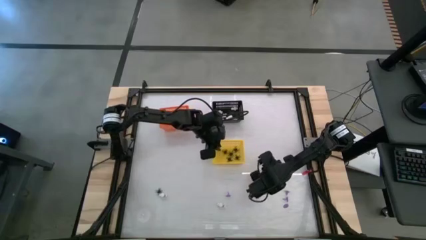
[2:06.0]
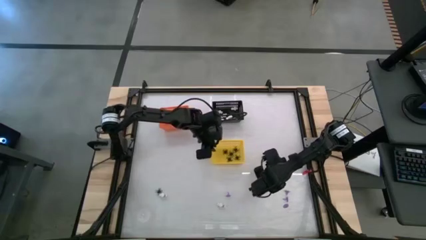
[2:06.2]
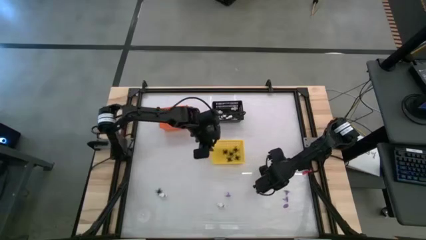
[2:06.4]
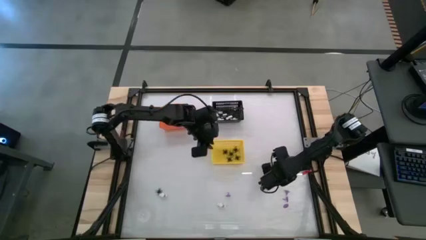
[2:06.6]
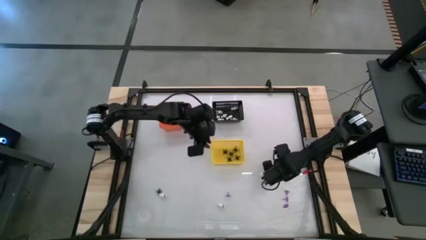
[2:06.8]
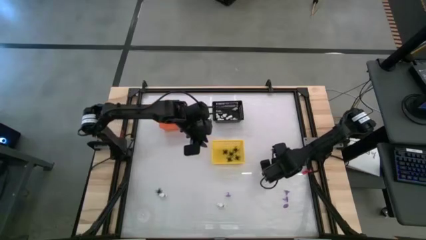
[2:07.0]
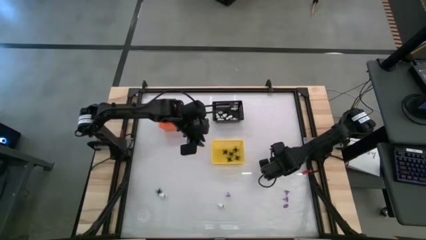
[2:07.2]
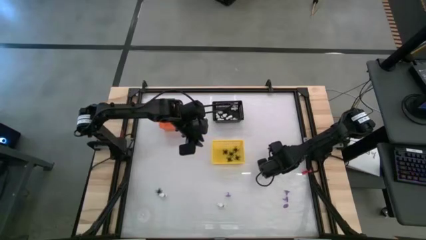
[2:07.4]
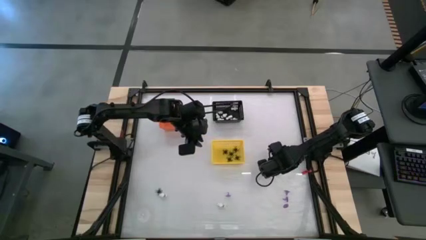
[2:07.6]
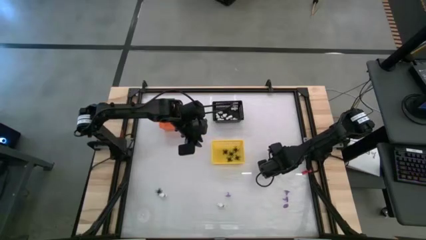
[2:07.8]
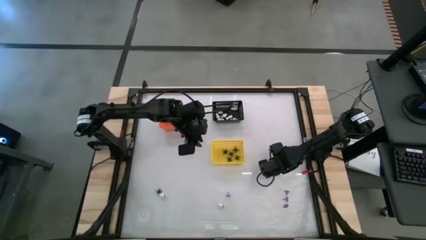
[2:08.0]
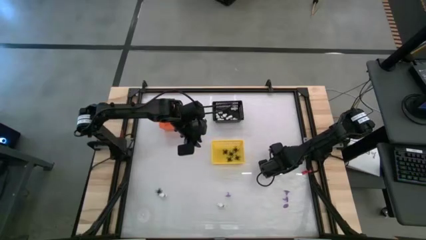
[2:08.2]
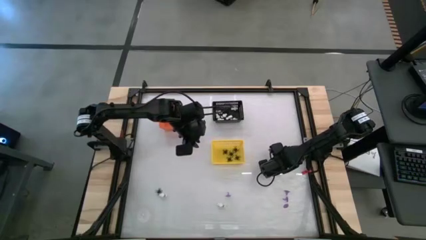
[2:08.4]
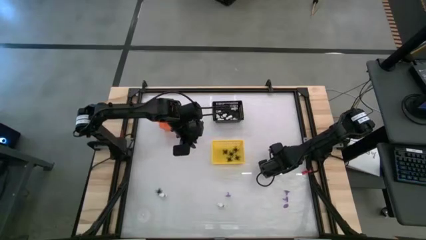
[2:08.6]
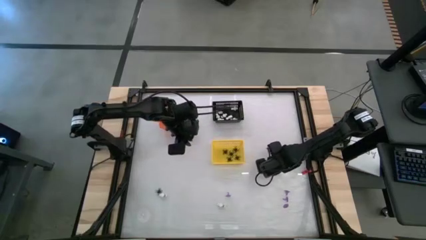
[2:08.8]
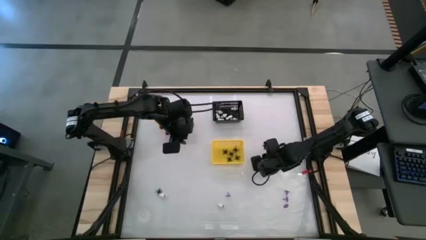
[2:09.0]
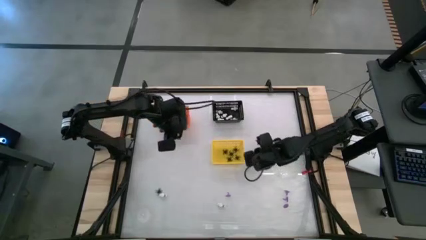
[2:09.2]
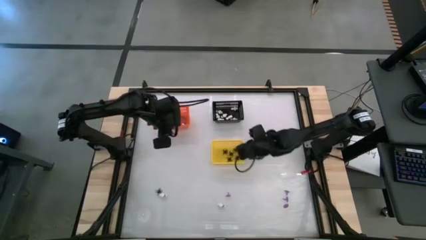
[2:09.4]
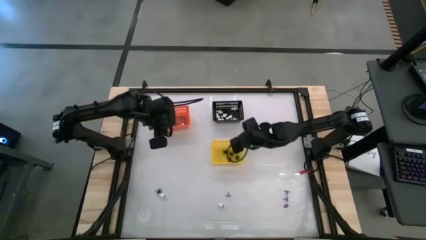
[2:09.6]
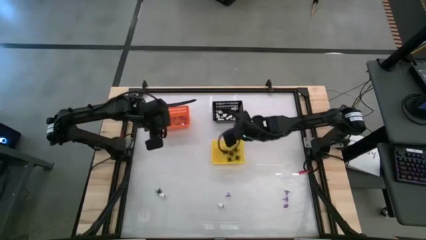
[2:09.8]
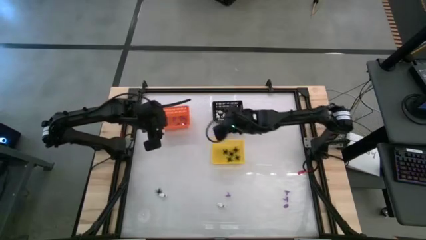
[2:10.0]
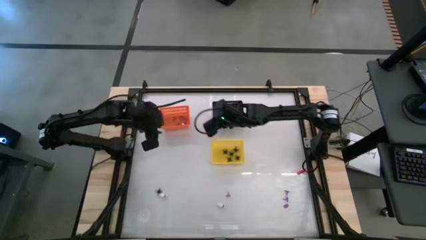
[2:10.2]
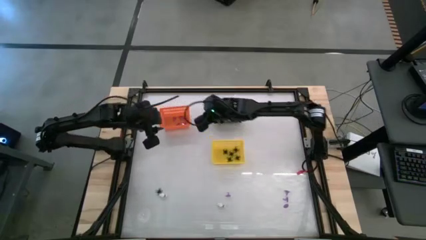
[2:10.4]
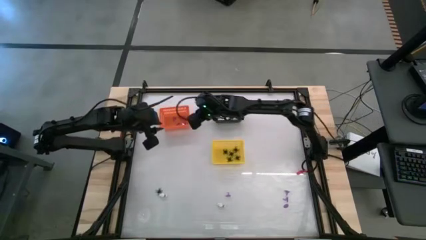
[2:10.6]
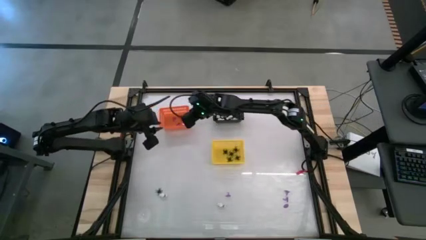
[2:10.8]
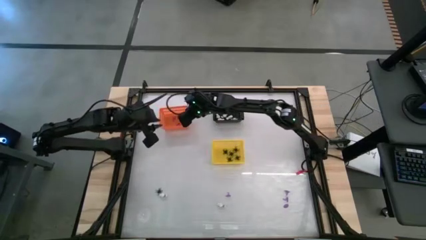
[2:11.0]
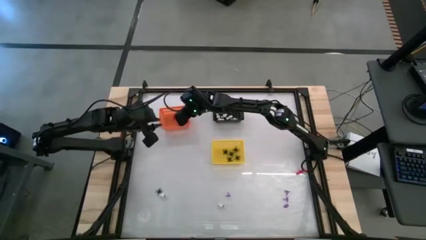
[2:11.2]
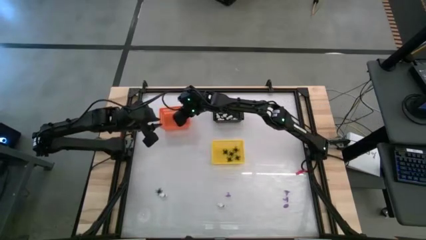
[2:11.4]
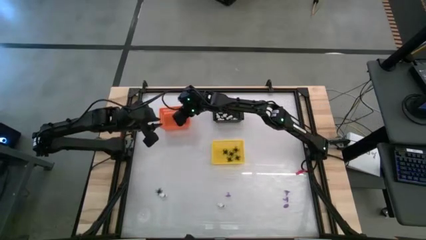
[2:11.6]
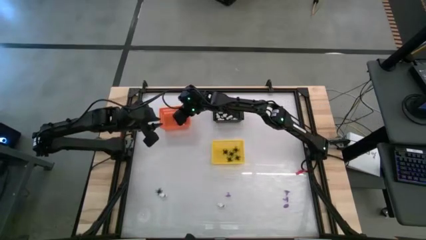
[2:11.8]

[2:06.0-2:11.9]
Task: Sort Halloween decoration
Put the violet witch hat into the orange bin

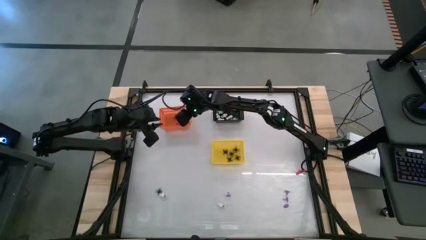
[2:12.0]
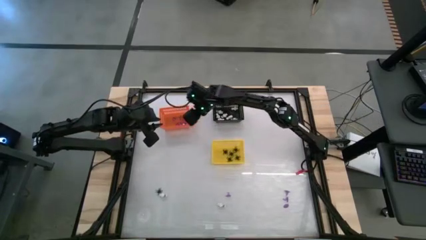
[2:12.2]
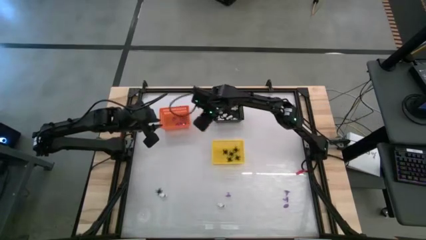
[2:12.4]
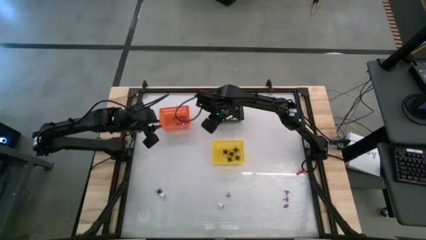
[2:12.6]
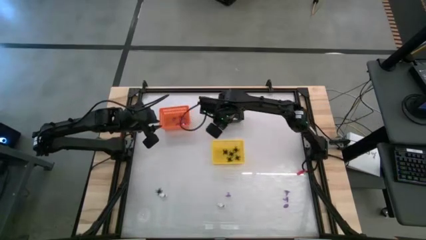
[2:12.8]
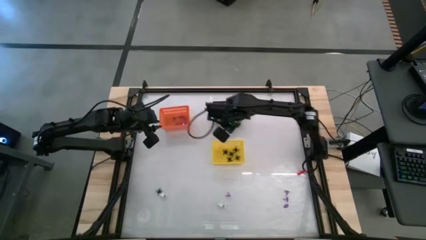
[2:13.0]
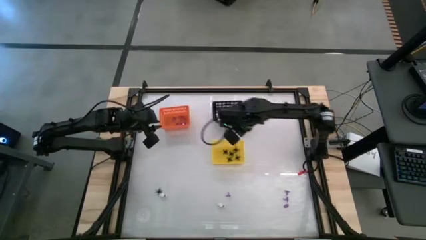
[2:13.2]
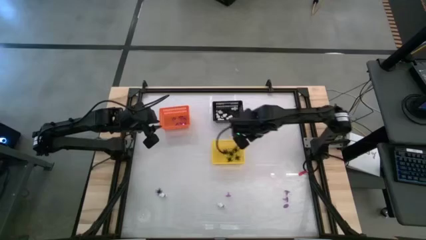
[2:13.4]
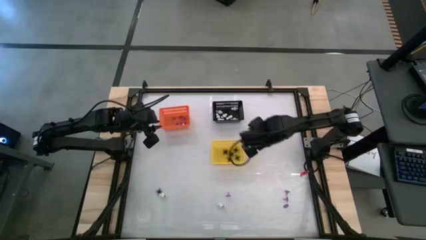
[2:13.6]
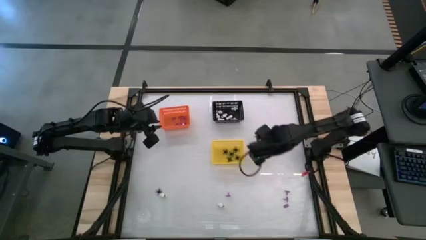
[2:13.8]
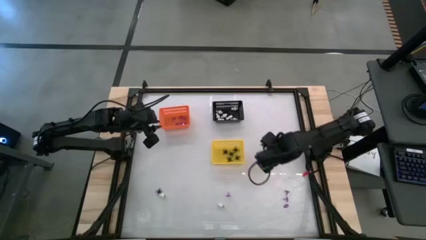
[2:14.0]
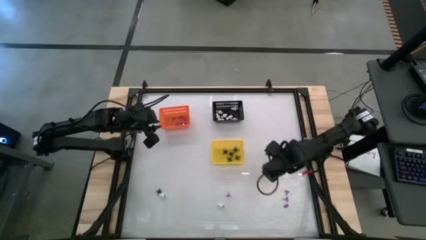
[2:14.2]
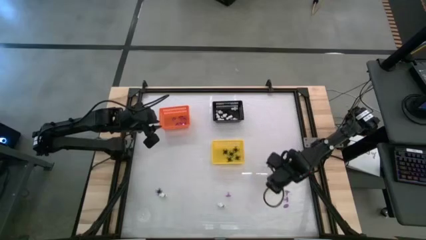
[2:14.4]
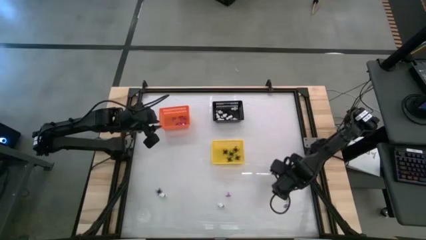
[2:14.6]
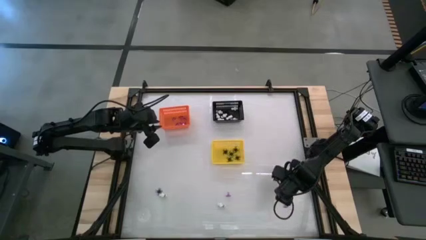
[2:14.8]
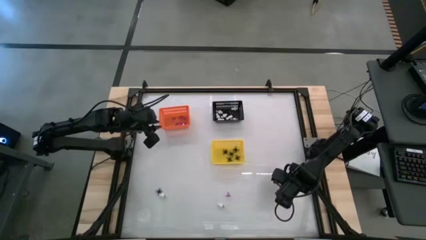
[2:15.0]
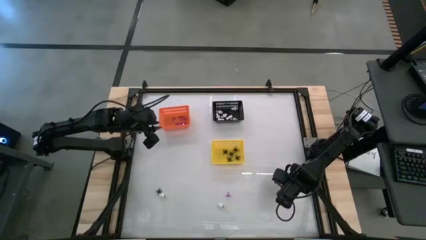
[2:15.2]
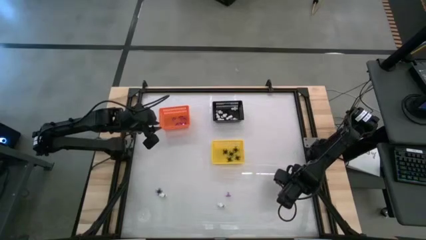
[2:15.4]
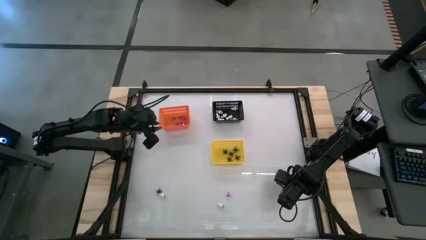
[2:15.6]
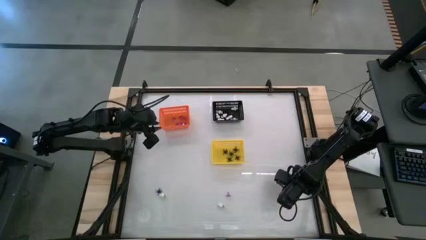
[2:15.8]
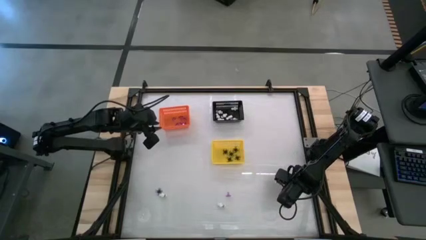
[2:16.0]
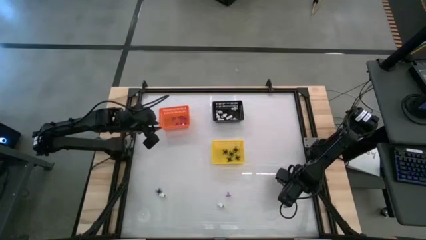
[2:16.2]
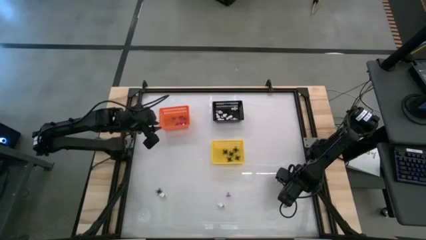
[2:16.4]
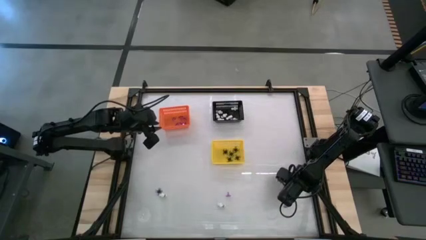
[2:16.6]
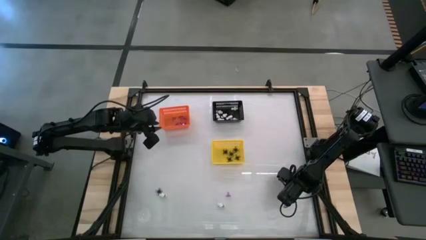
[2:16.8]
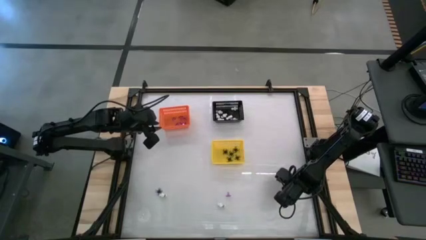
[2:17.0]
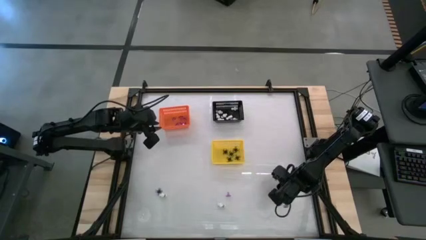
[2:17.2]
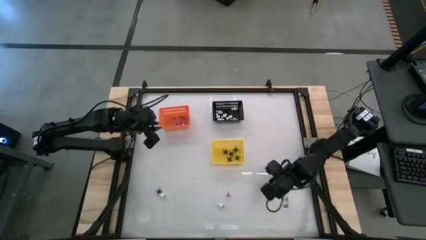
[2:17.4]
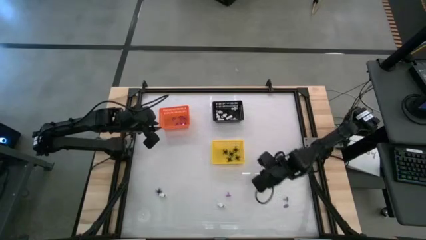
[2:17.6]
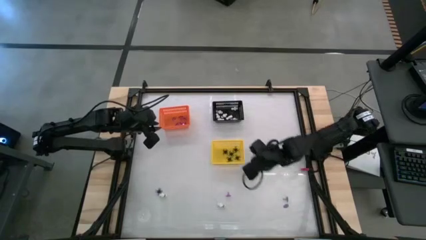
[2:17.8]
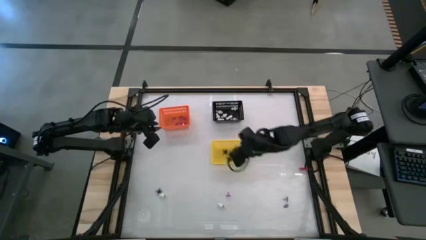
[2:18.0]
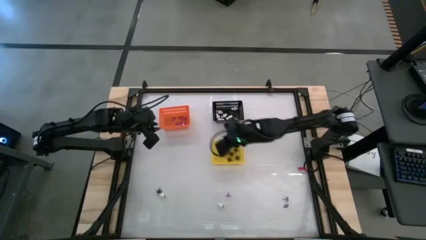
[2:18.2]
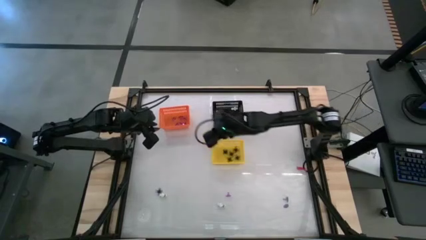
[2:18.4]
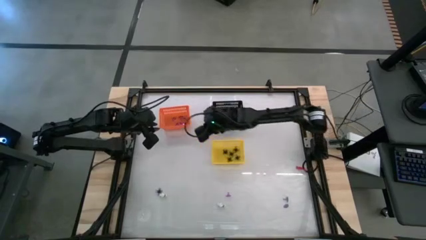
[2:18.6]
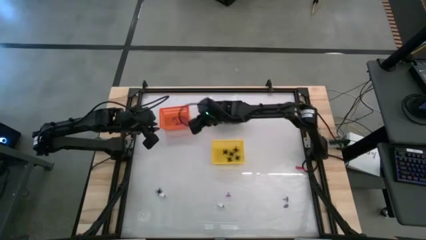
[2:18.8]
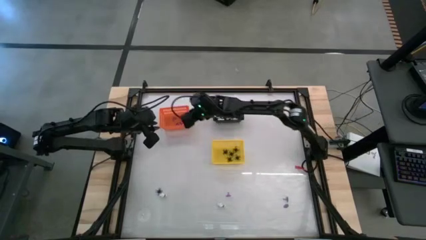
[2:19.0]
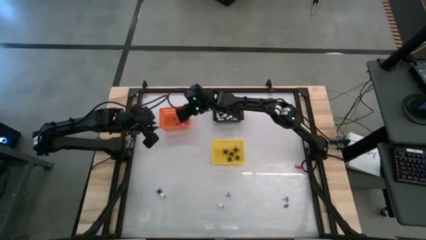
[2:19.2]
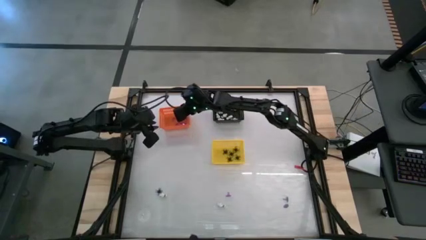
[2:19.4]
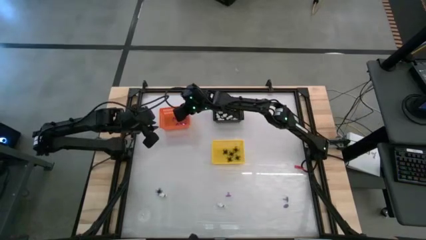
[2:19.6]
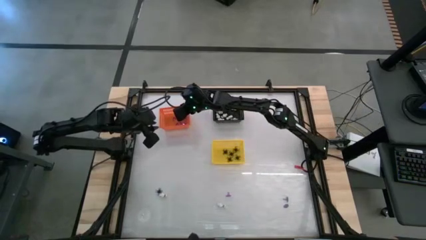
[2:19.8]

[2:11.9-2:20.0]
Put the violet witch hat into the orange bin

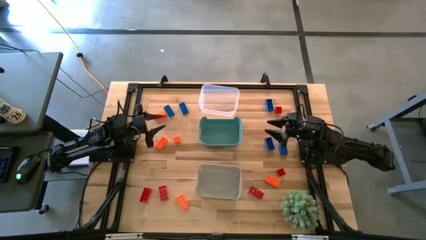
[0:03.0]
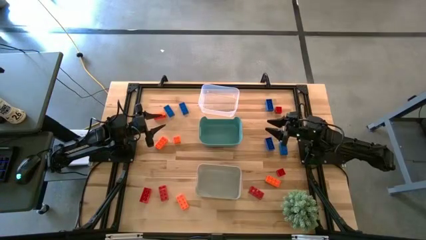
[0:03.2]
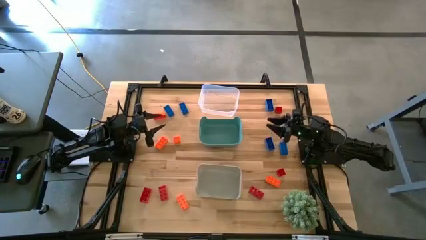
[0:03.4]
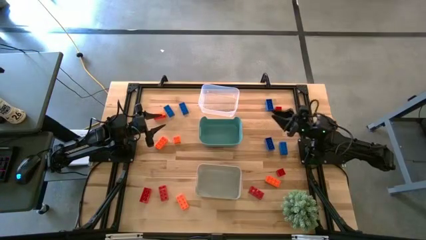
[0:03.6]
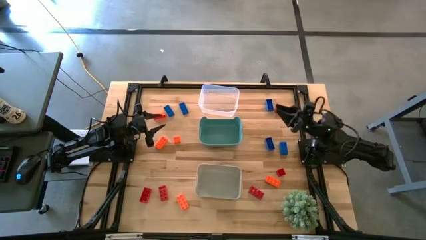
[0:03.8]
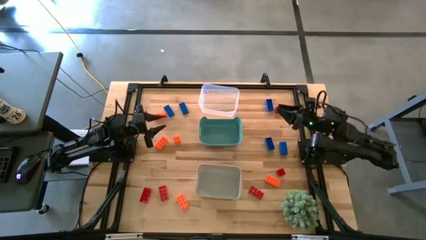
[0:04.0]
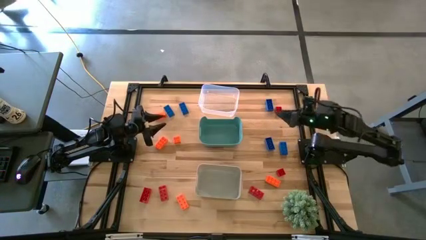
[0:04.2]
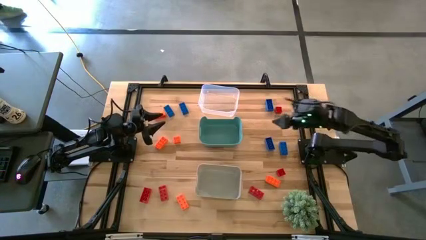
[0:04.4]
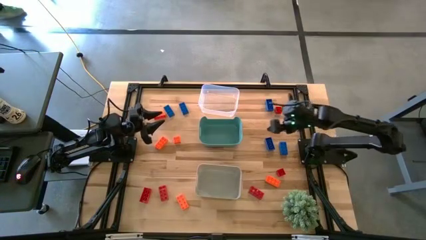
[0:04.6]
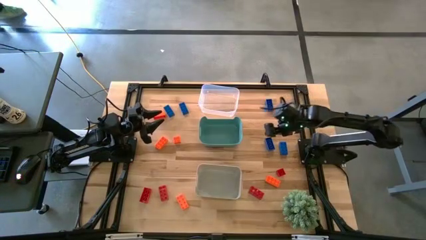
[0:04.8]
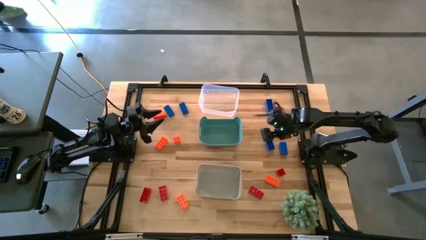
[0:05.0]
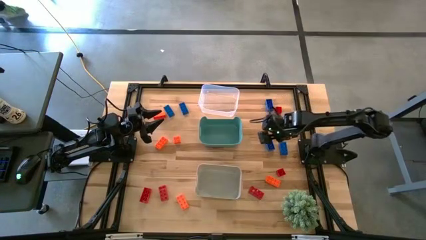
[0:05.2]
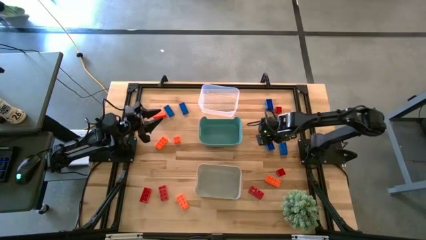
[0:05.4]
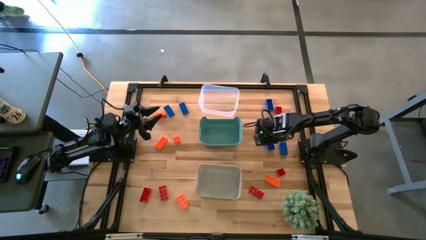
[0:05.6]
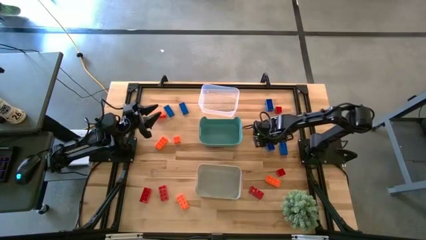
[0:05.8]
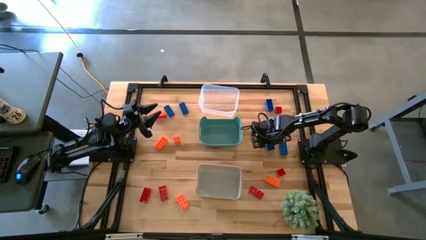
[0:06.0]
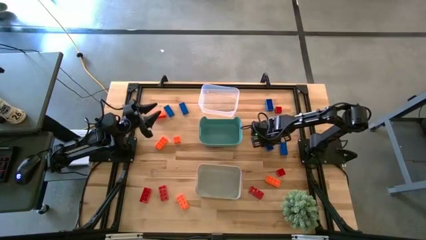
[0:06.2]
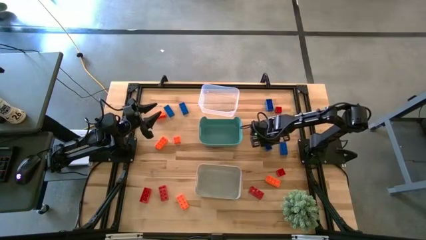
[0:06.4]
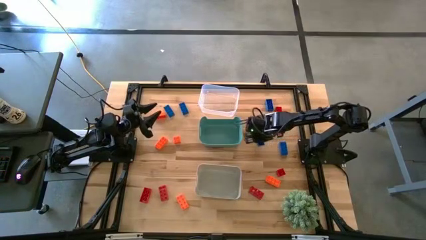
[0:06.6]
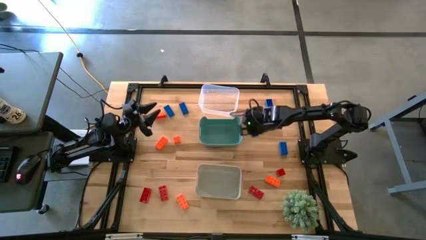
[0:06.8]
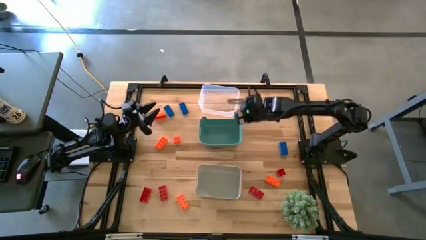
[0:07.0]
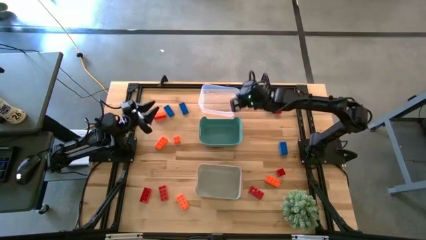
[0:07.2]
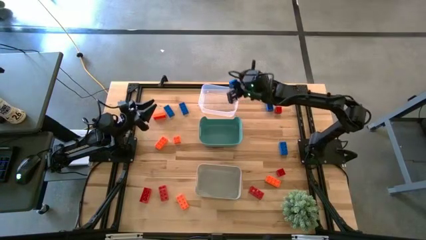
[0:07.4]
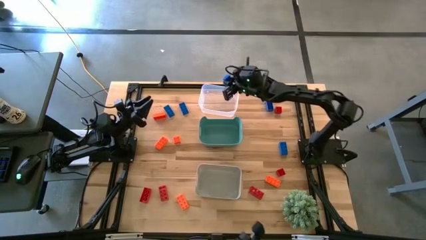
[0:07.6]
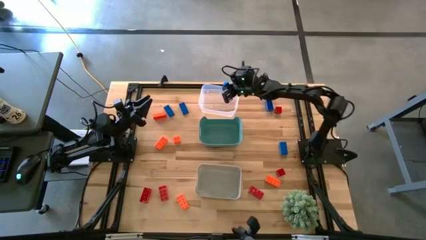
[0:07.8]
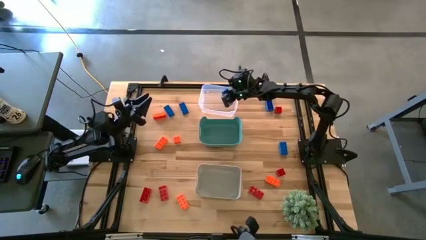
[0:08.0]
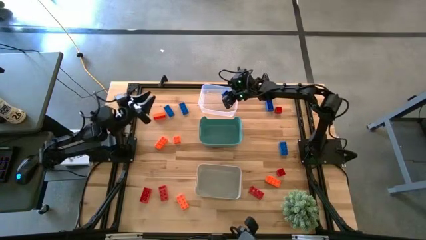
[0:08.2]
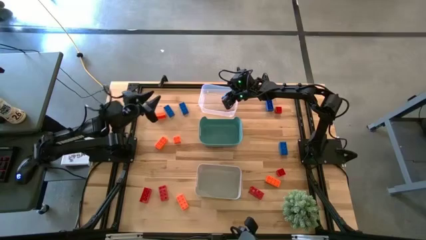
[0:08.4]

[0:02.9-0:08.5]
Task: Sort & place blocks by color
Put the blue game piece into the transparent bin
